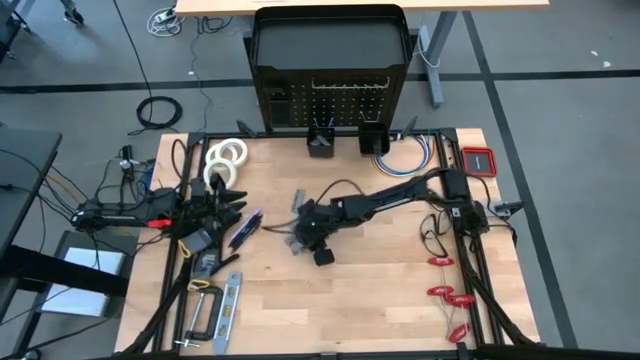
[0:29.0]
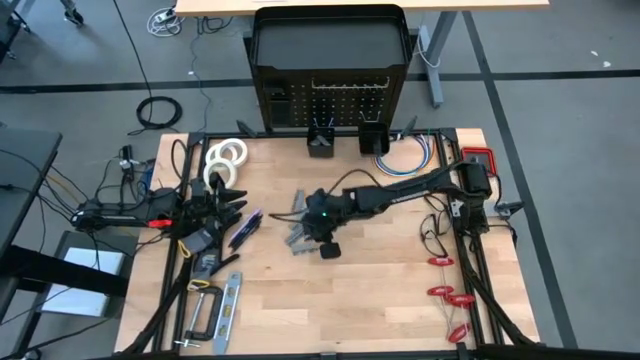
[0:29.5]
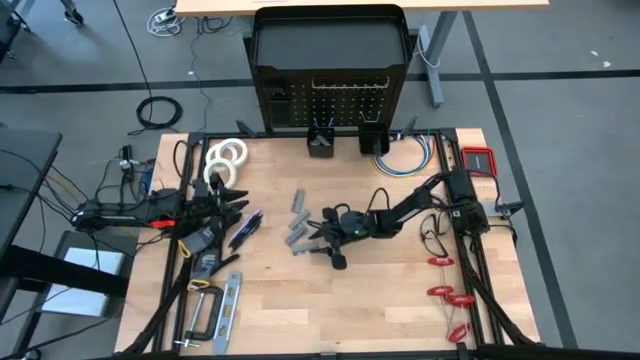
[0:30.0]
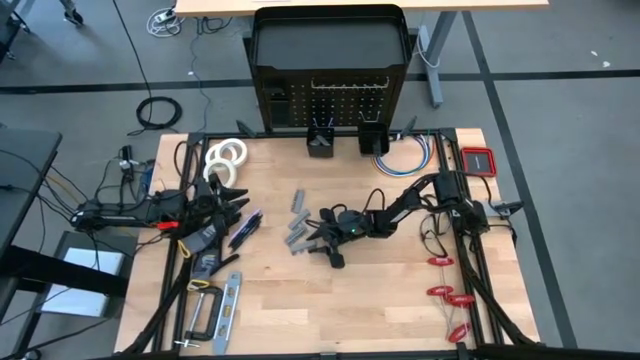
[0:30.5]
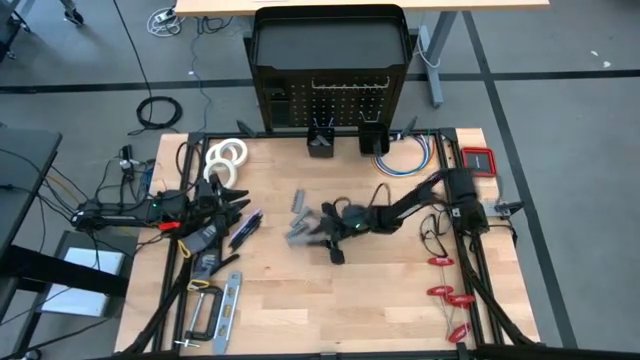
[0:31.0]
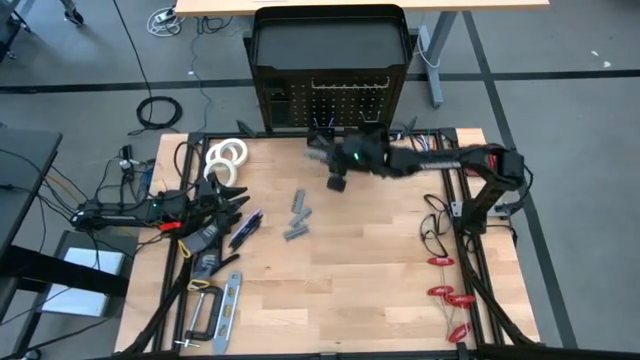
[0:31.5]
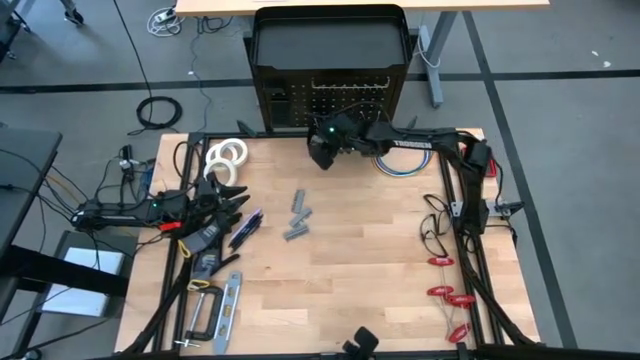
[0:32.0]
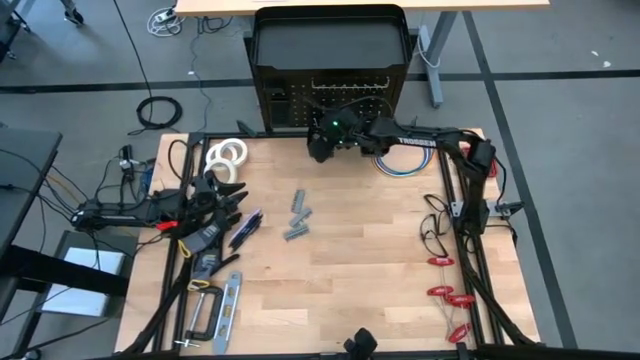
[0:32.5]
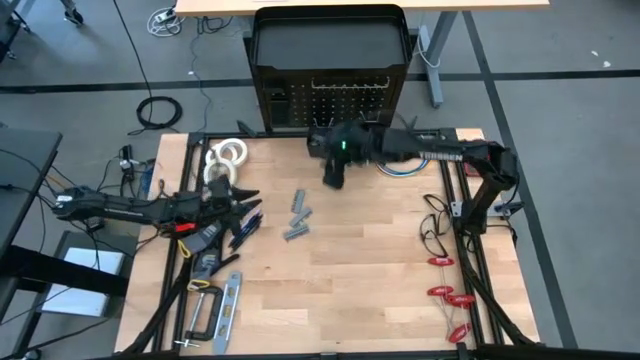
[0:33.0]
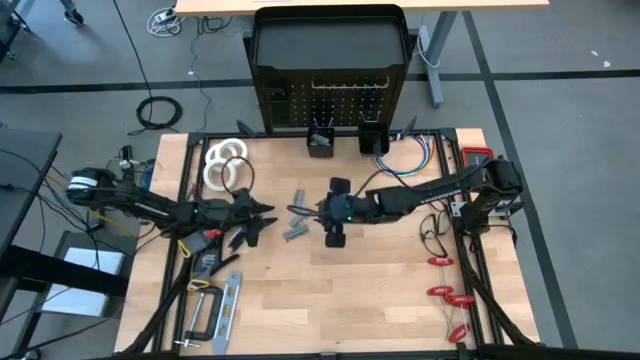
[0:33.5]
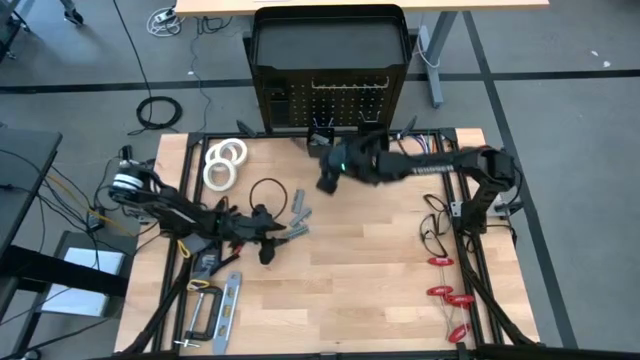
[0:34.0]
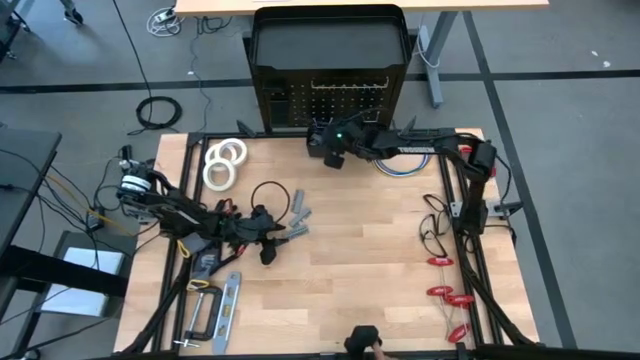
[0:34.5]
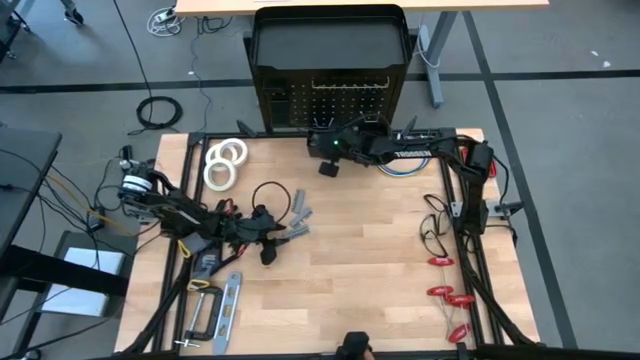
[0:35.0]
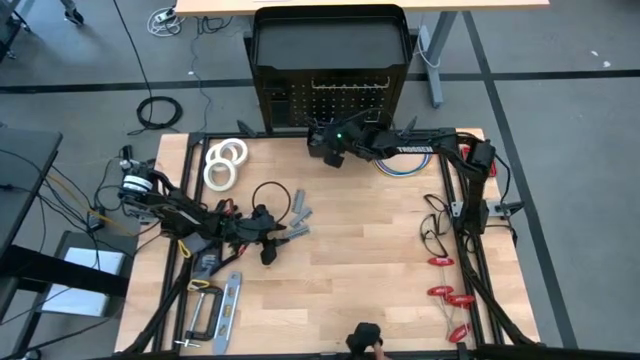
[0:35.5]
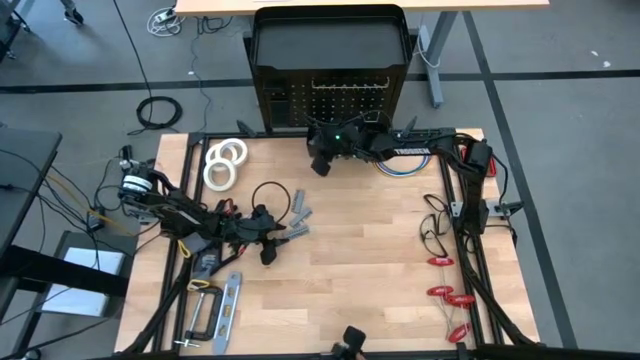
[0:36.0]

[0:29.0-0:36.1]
Task: Hang tools onto peg board
Put the terminal block into the left peg board bin

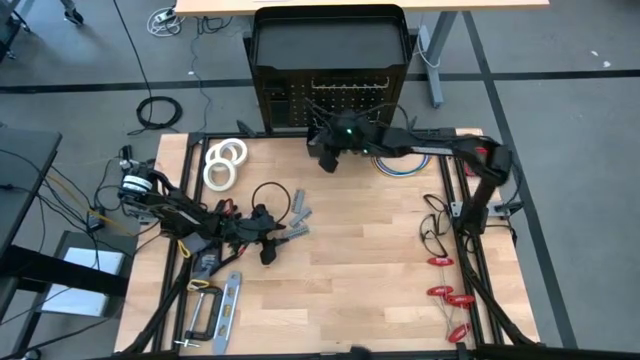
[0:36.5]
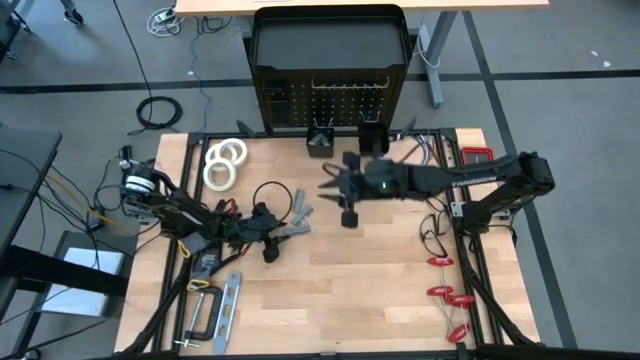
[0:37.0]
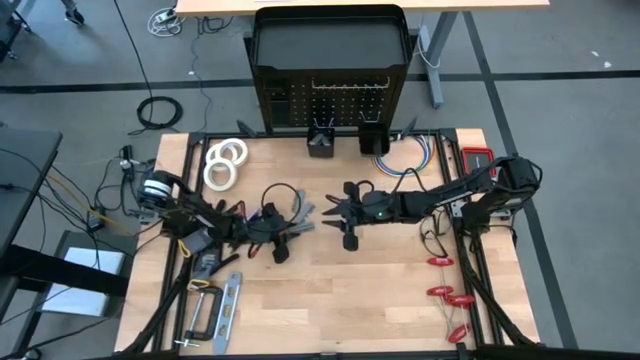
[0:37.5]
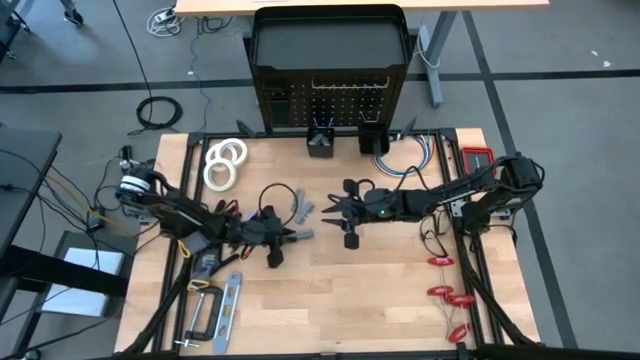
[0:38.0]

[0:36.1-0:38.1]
Put the terminal block into the left peg board bin

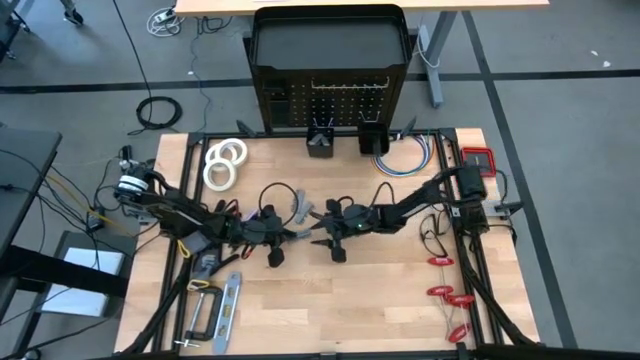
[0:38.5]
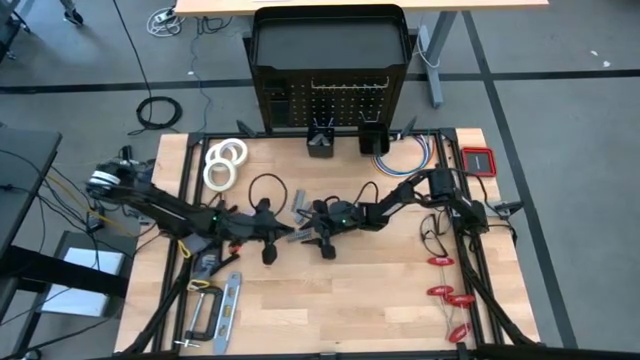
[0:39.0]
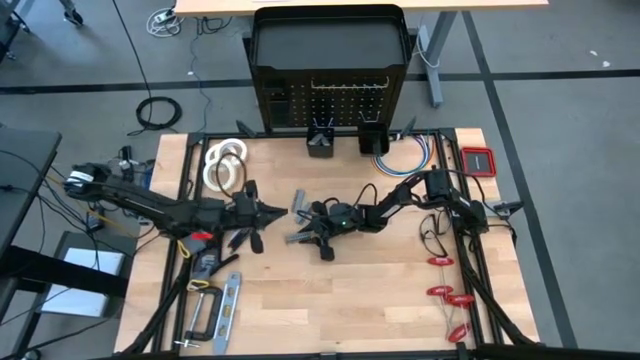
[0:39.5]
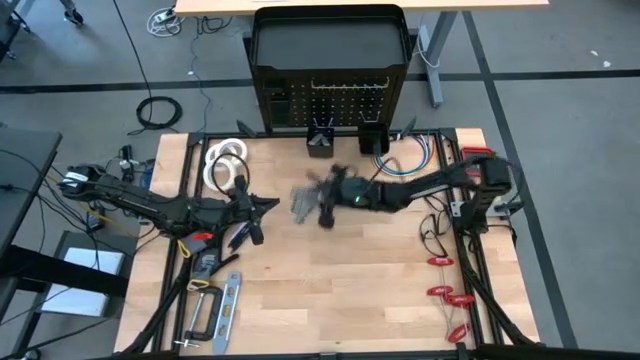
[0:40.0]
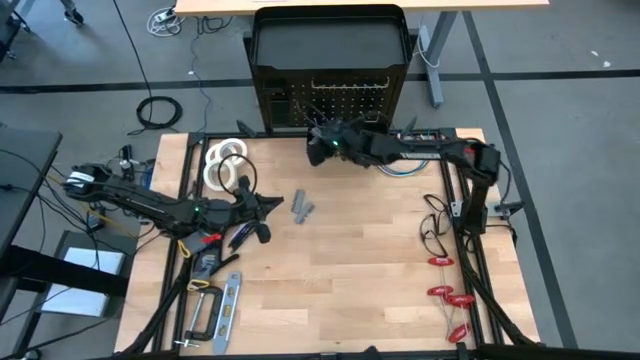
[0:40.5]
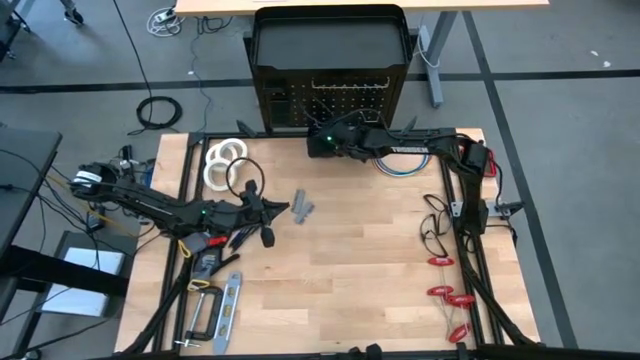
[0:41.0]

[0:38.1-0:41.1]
Put the terminal block into the left peg board bin

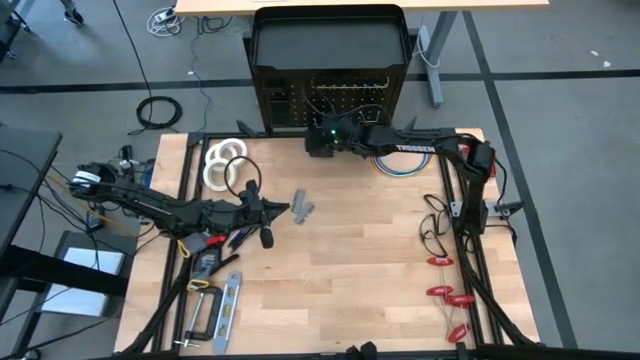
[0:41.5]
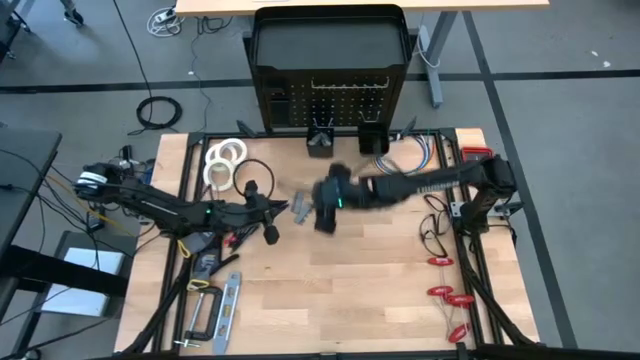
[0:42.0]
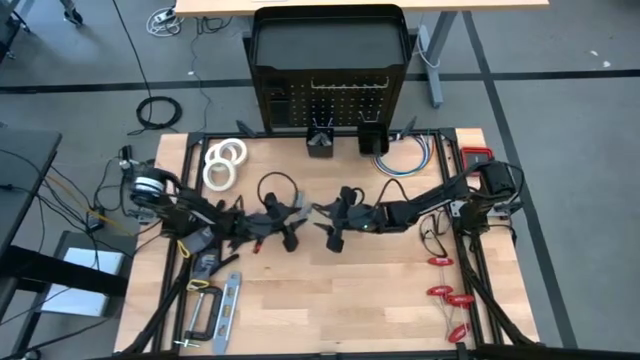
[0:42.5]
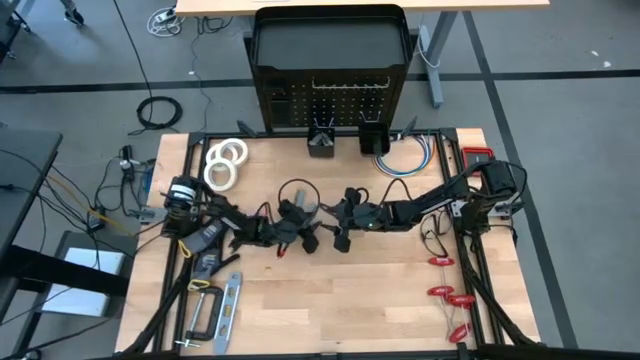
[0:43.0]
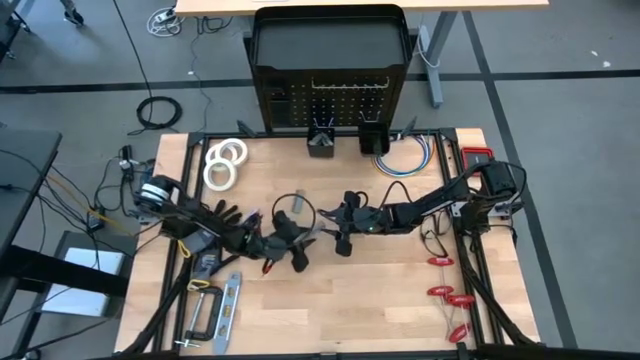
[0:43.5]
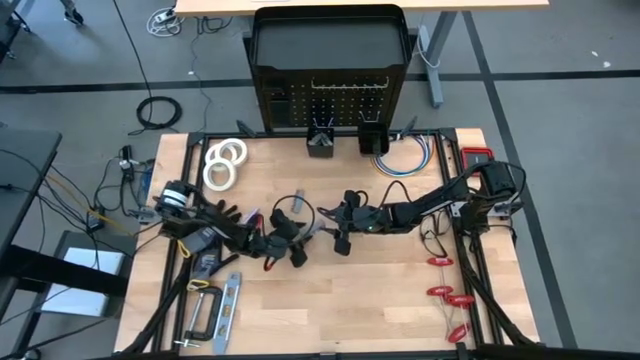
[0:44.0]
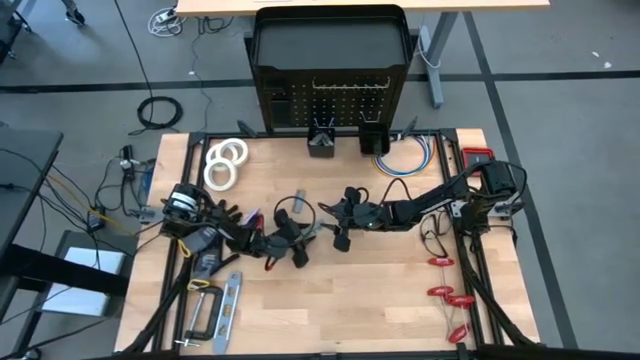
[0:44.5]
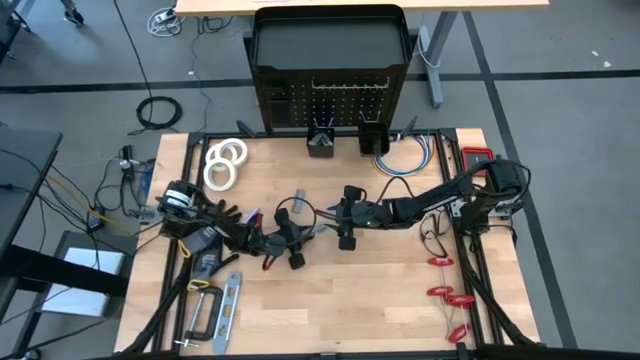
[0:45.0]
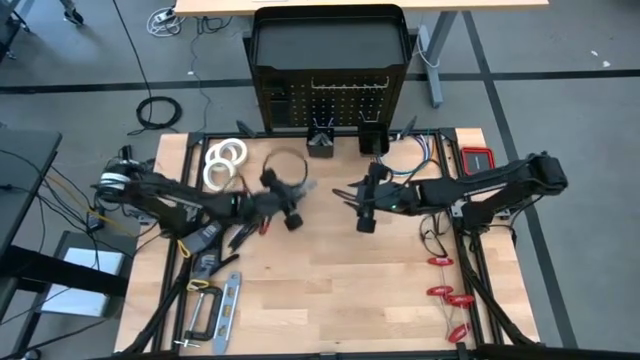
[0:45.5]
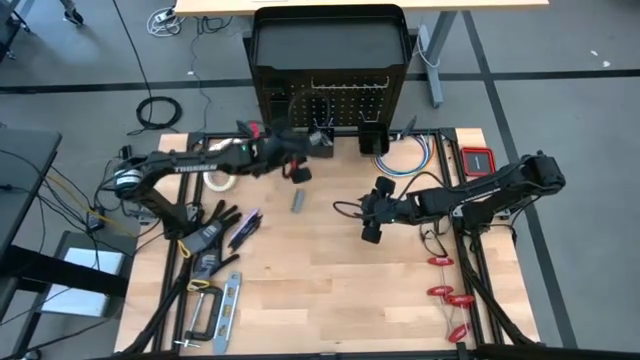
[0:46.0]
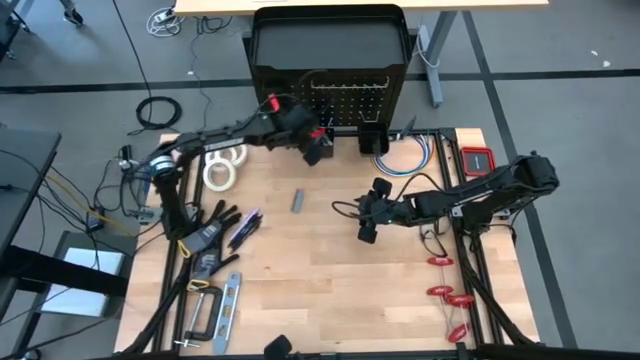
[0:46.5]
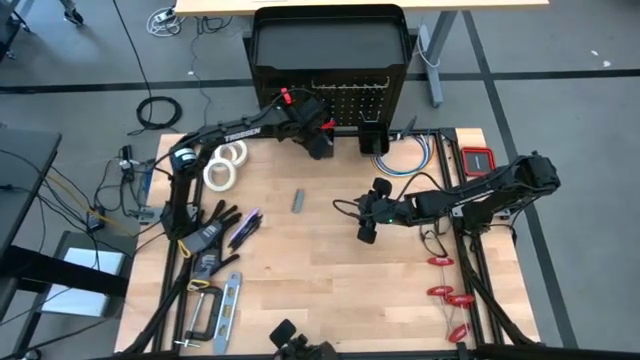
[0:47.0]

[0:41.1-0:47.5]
Put the terminal block into the left peg board bin

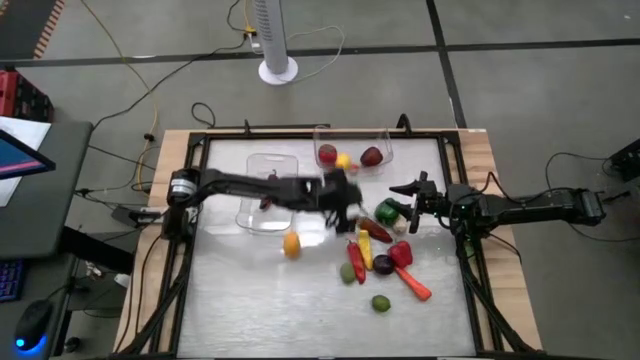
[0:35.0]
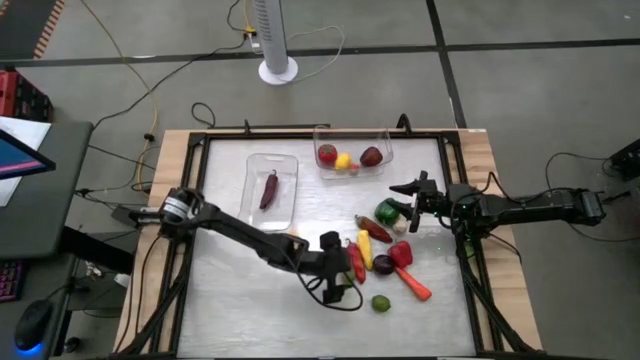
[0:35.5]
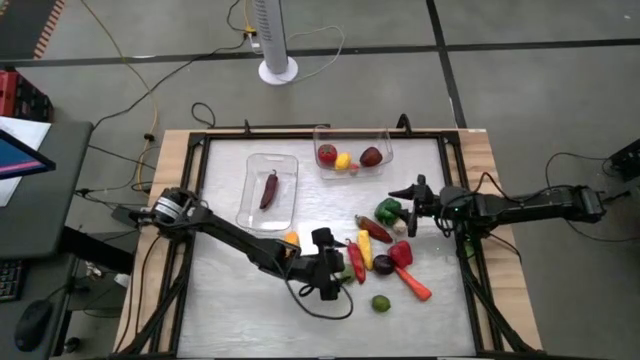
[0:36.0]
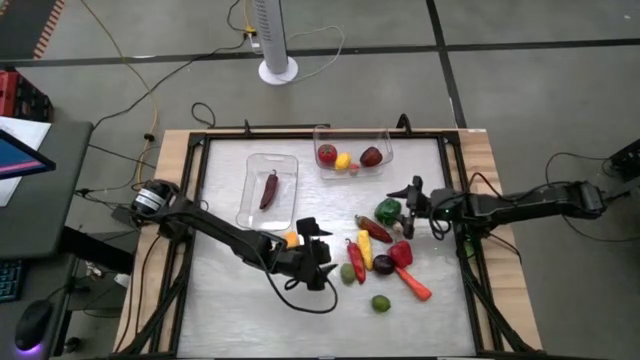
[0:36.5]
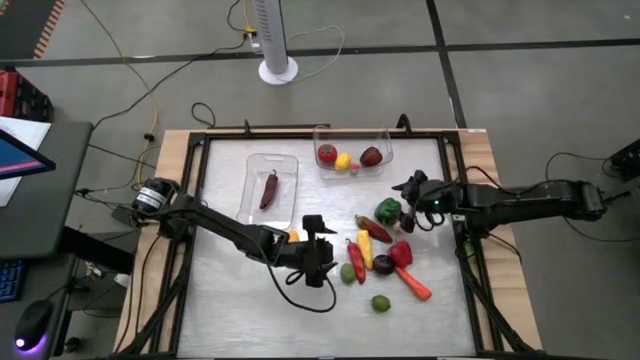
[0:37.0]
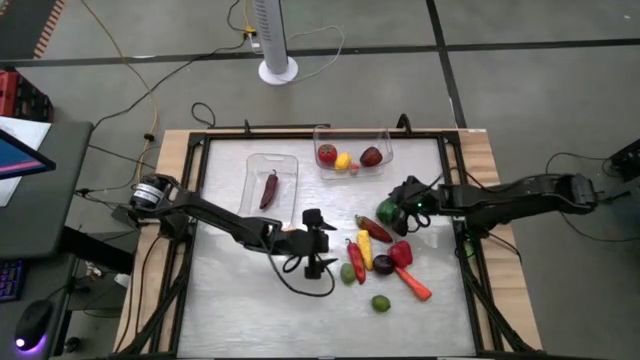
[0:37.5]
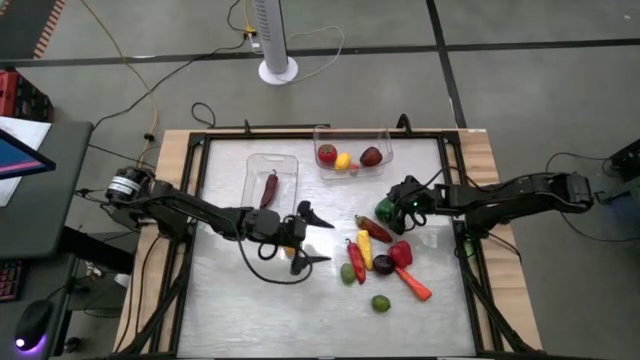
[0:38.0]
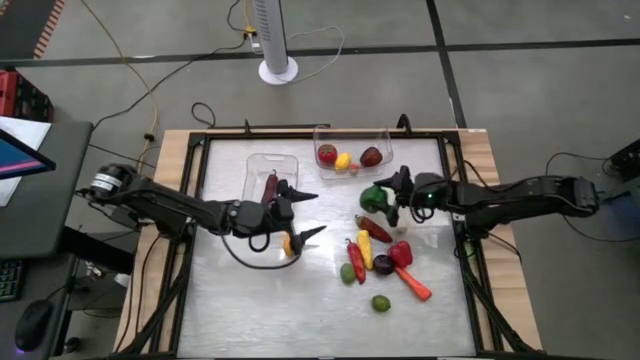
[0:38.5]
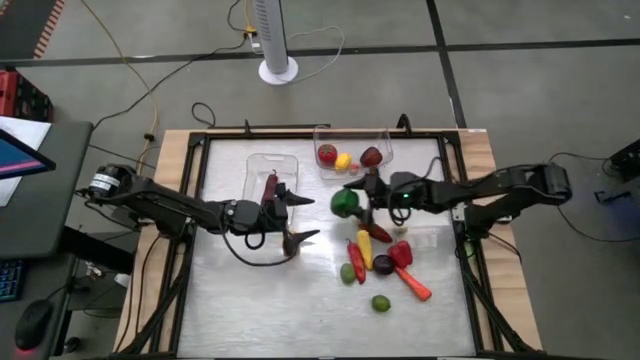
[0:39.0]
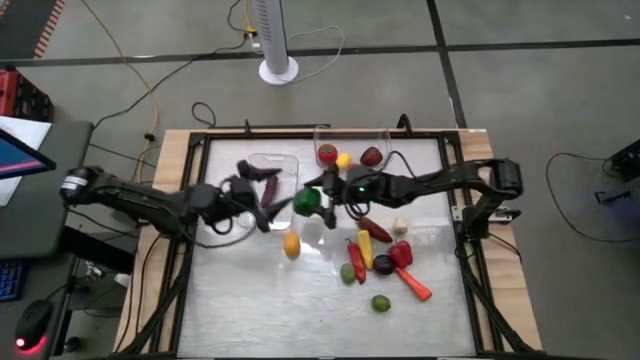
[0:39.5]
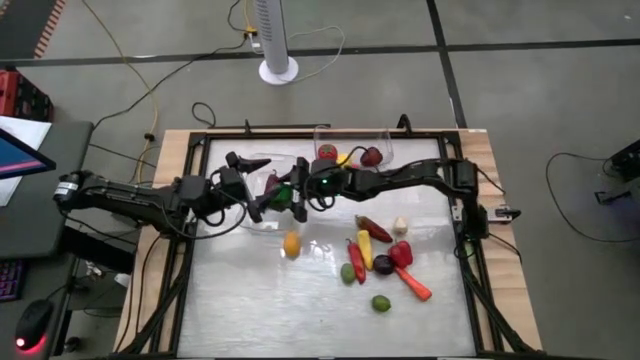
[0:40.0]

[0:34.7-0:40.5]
Task: Sort produce into baskets
Put the green bell pepper into the left transparent bin
